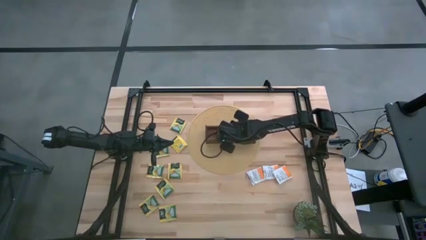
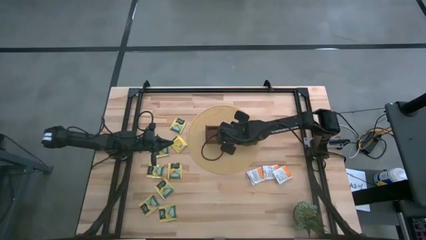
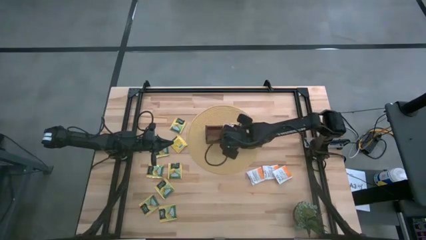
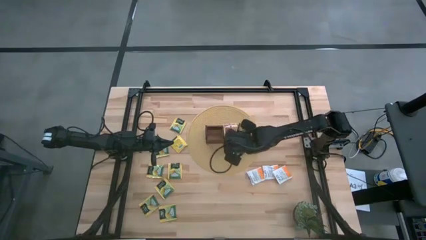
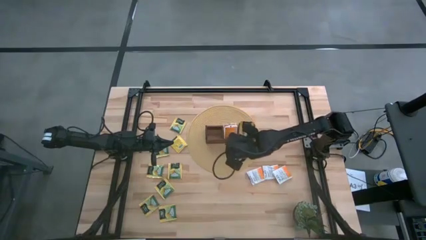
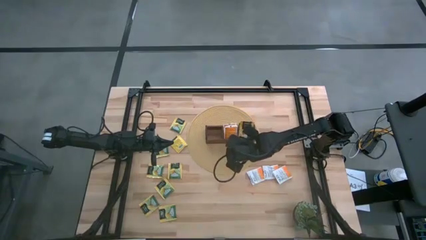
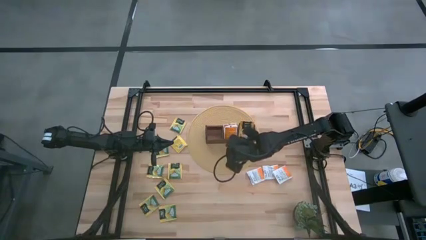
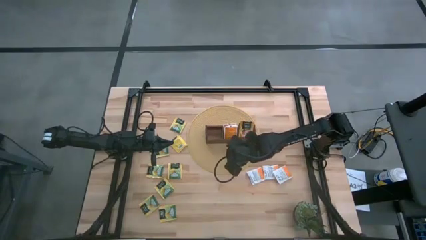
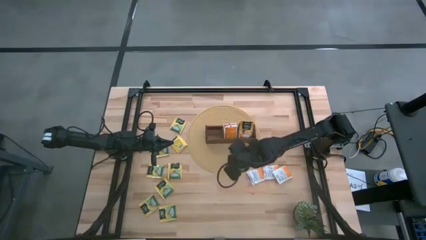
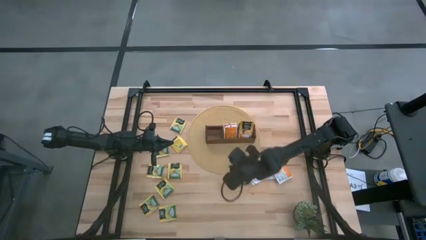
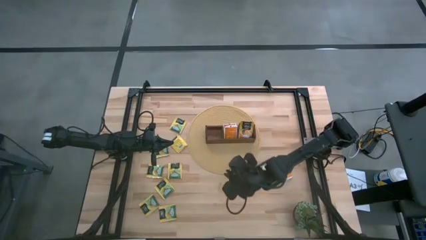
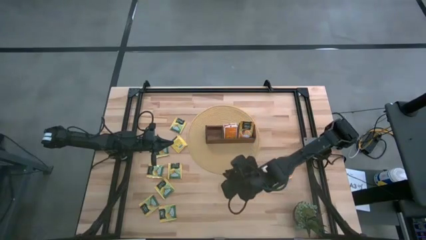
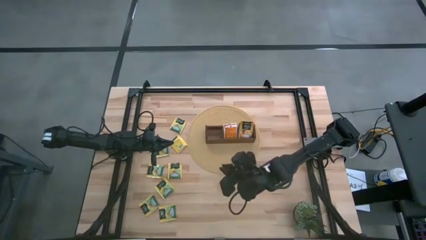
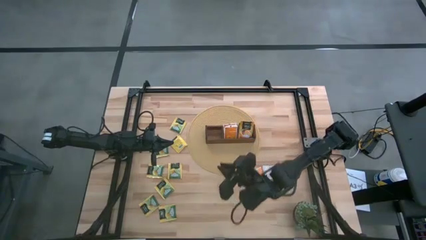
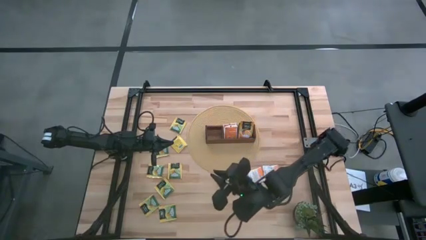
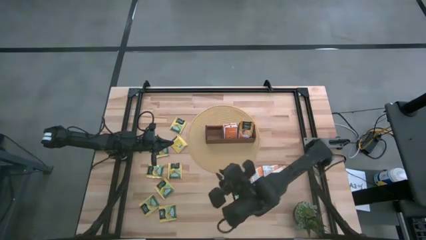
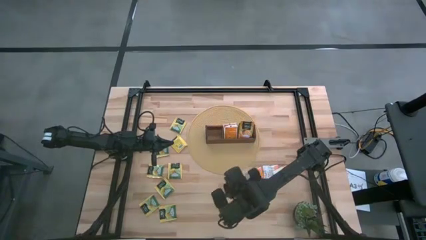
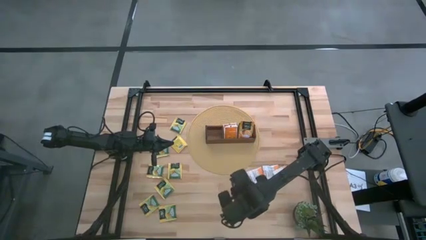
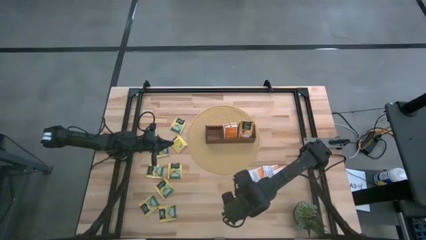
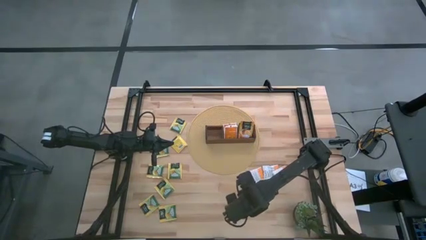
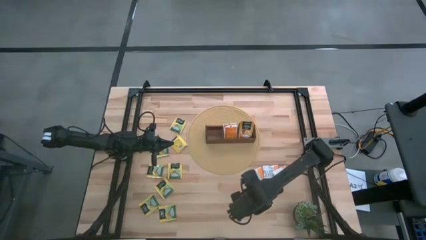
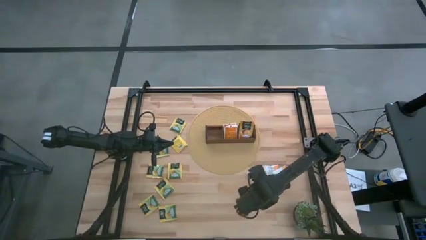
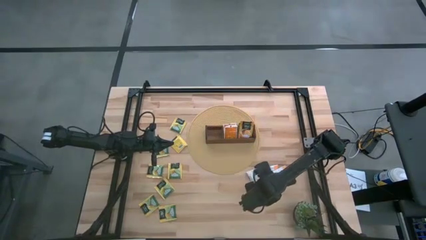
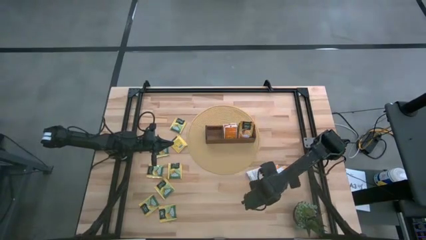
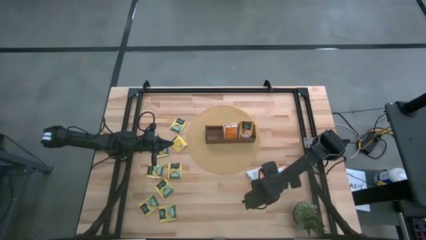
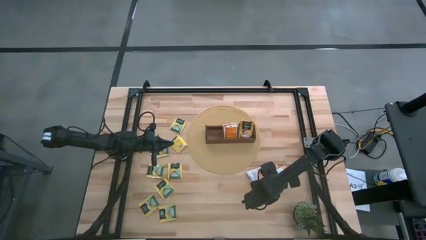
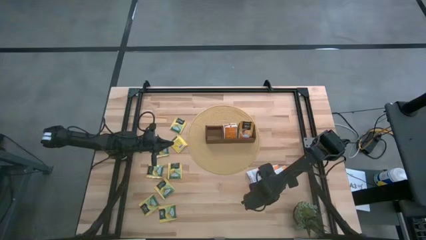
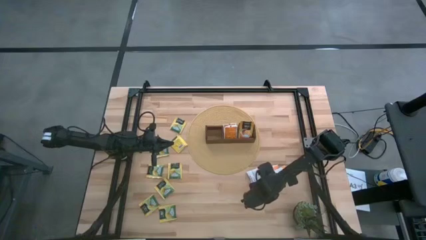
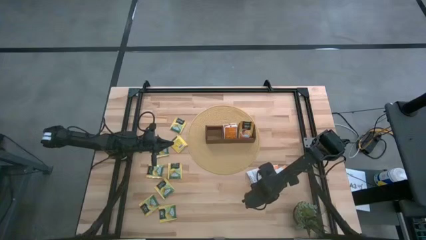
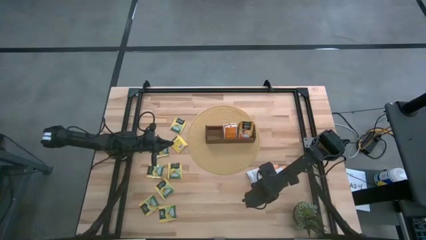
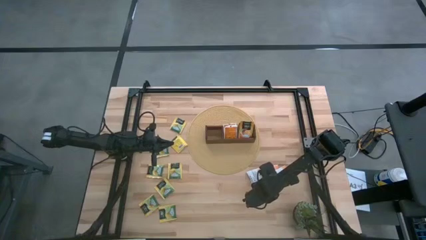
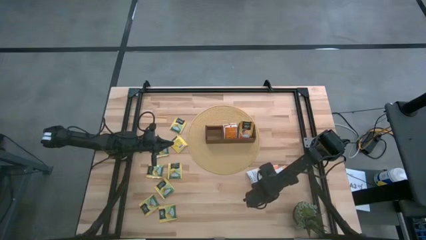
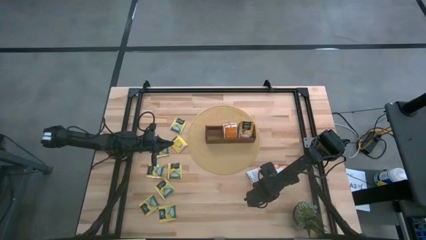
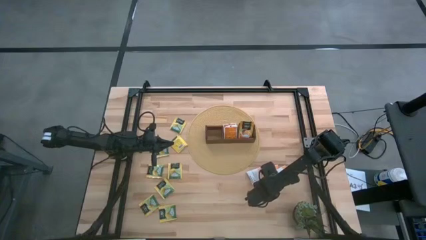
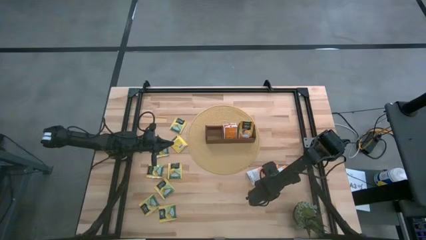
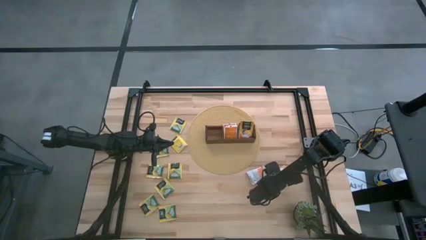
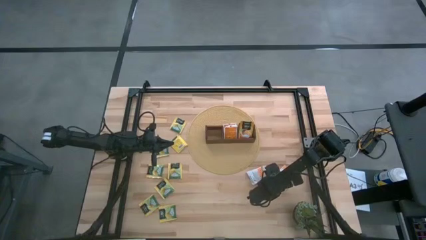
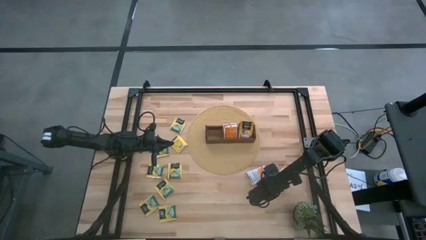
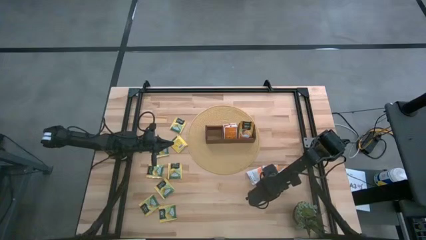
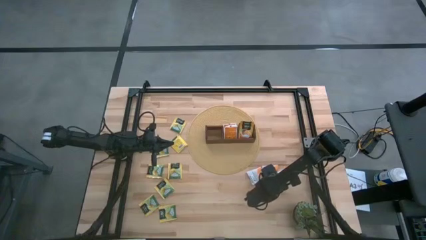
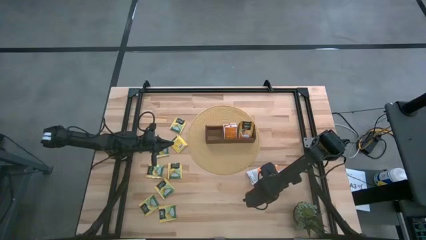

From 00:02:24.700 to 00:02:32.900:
Task: Pick & Place Tea
Put the white tea bag into the middle section of the wooden organizer

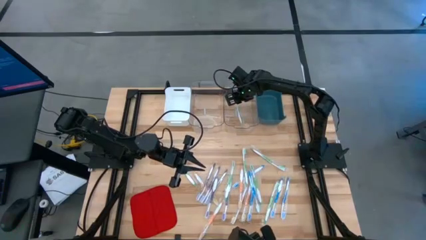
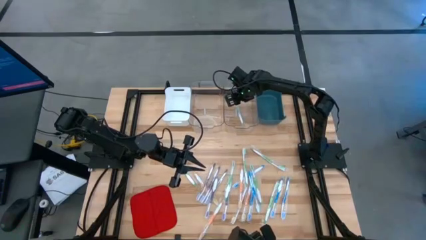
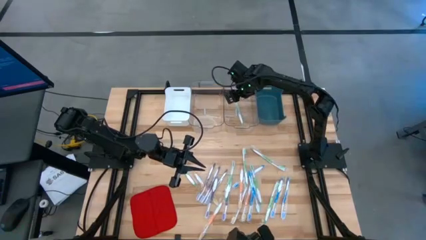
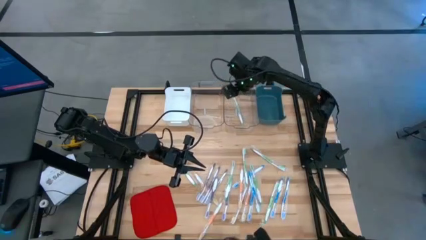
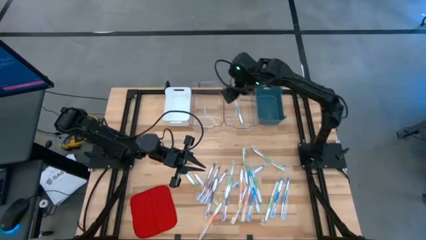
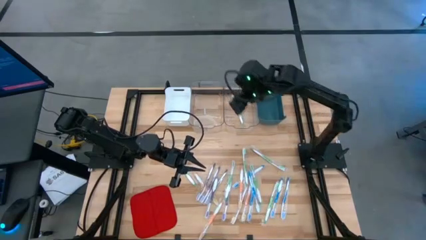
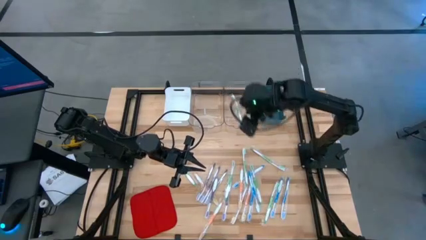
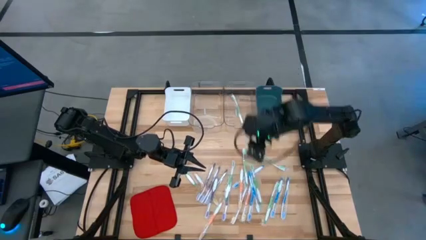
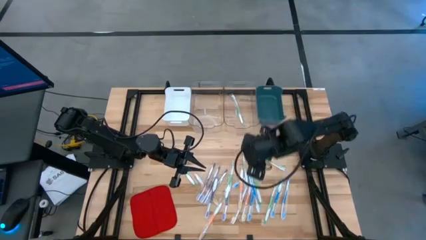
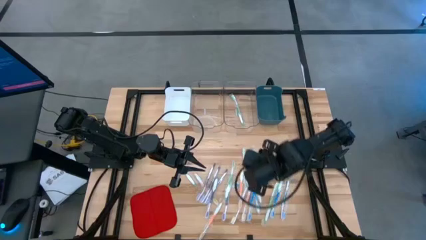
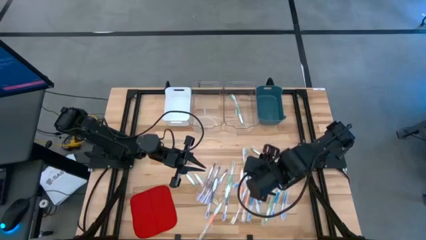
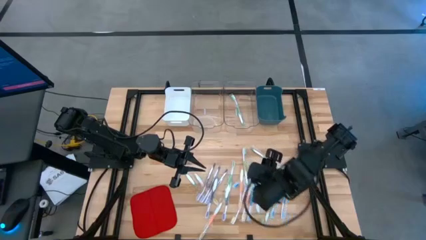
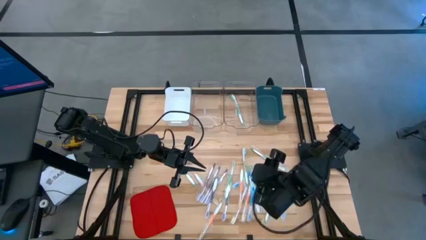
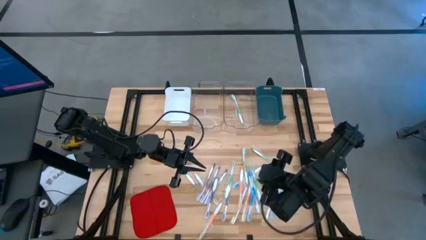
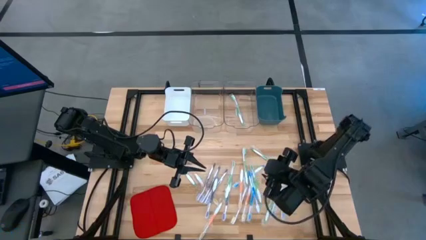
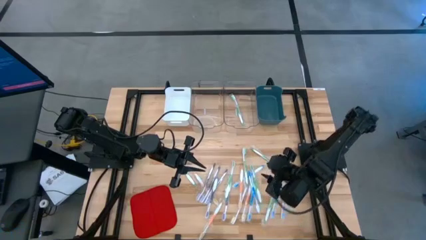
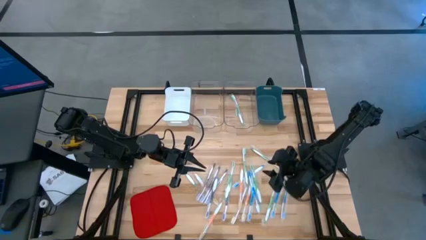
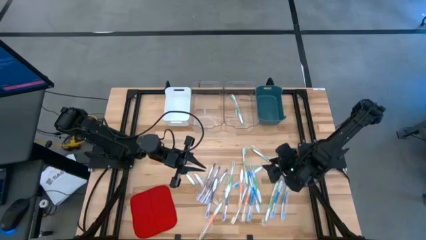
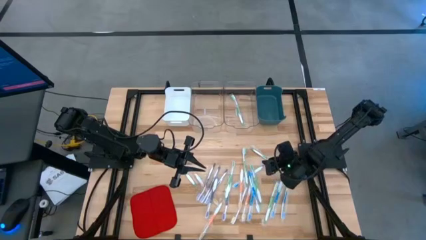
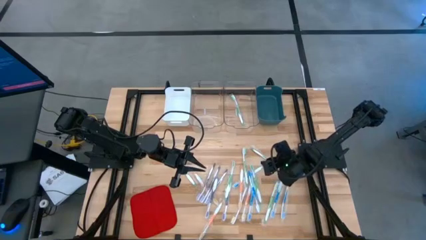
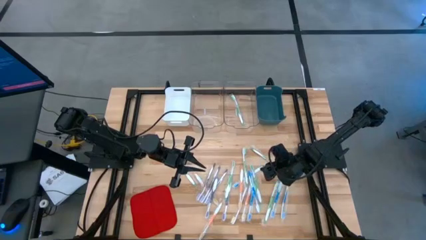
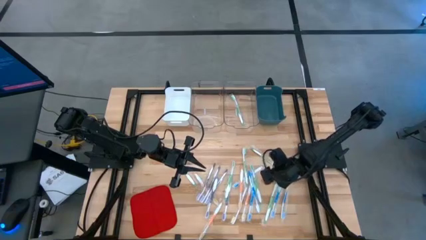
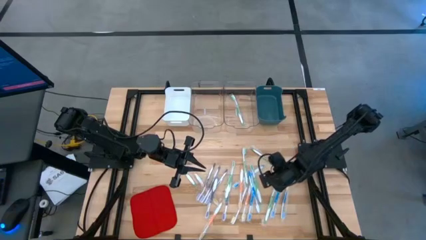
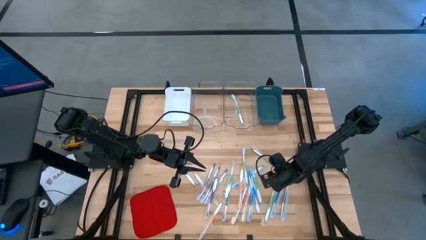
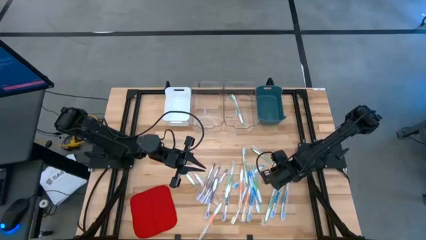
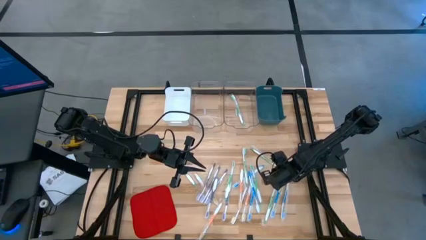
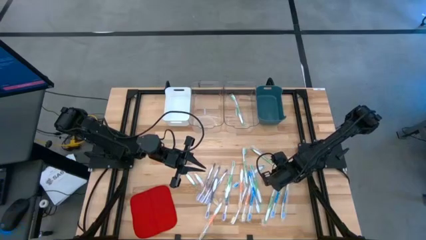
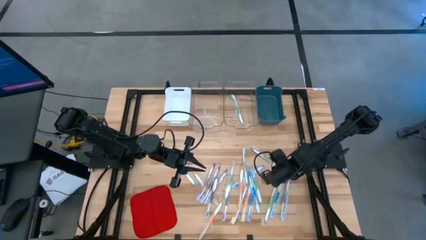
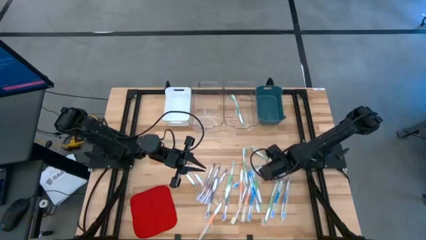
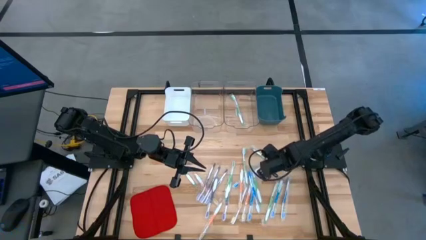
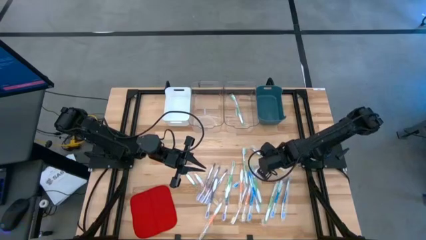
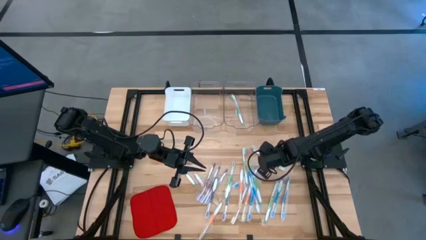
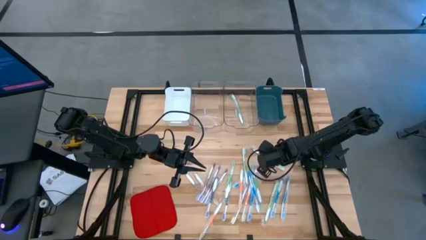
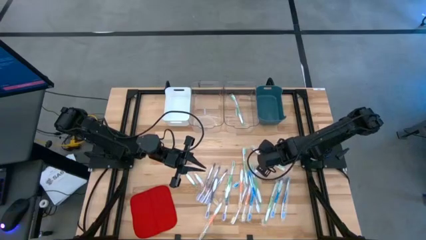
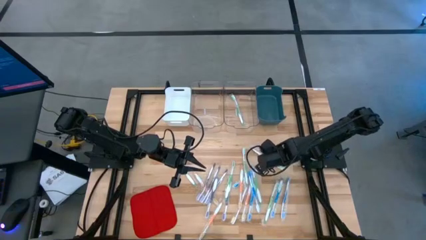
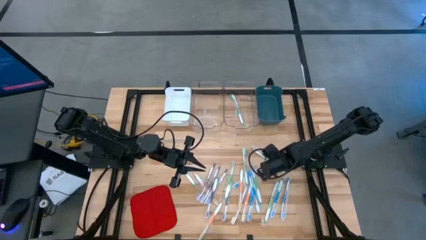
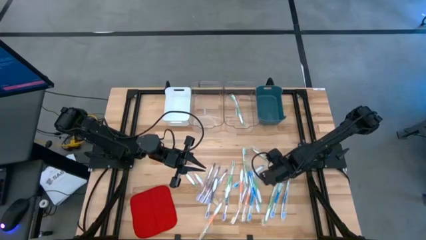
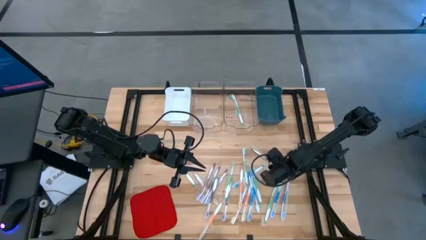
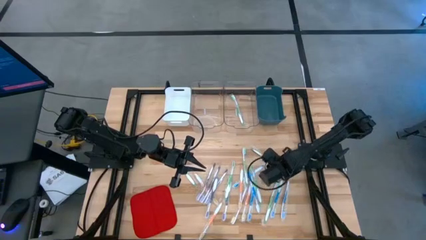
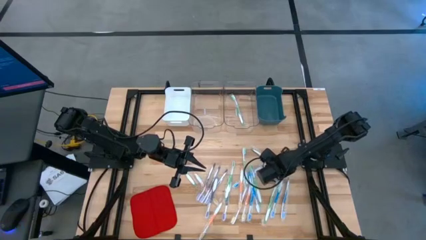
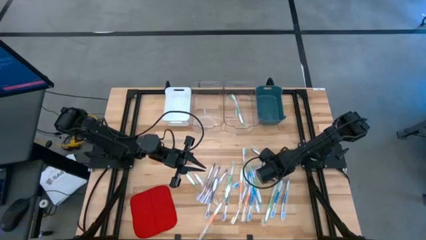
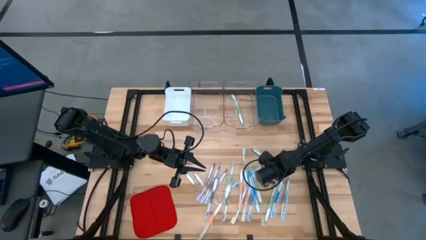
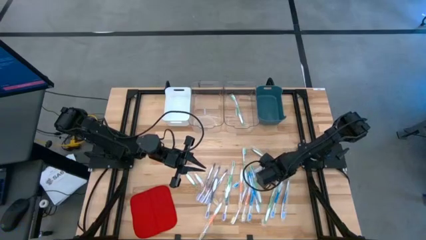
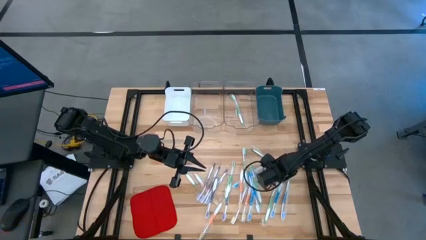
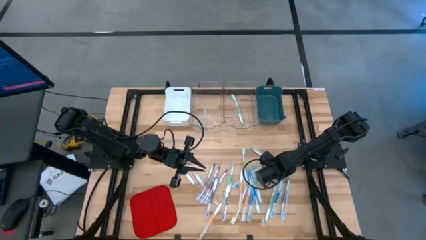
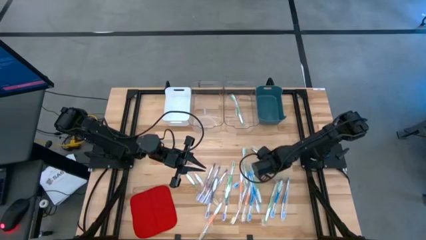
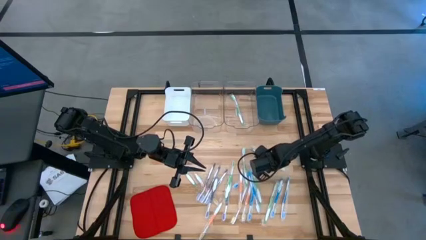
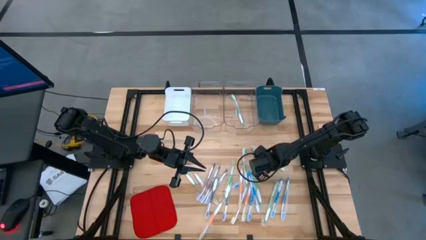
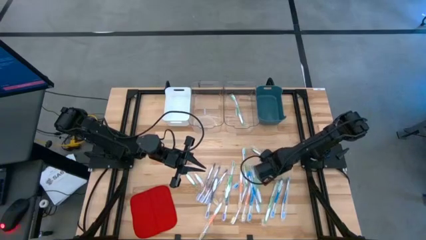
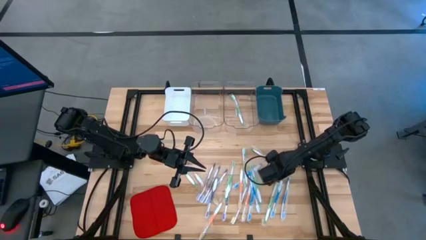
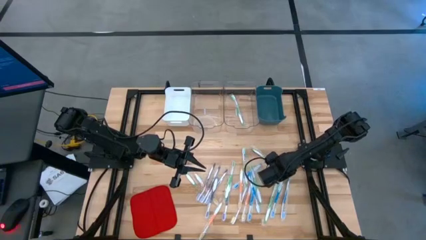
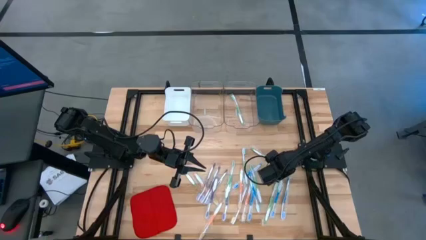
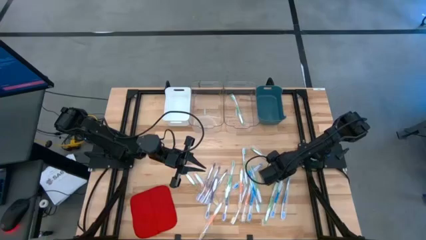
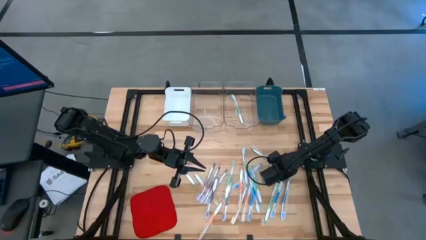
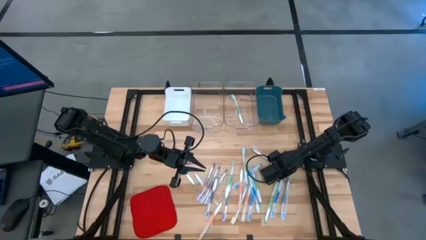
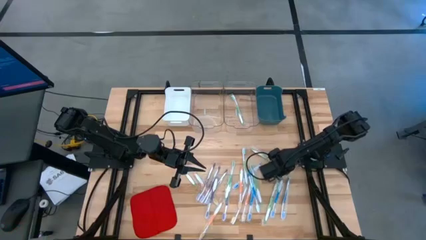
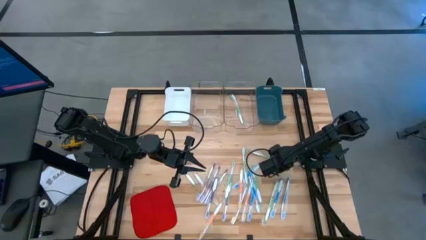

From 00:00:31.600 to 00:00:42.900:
Task: Pick & Place Toothbrushes
Put the green tooth brush into the right transparent bin
